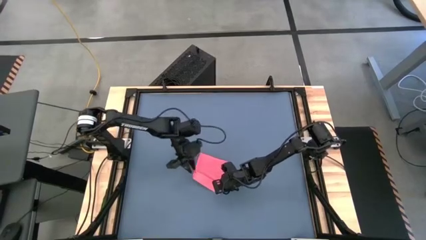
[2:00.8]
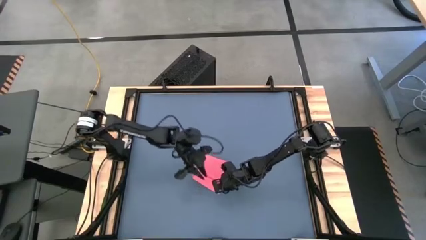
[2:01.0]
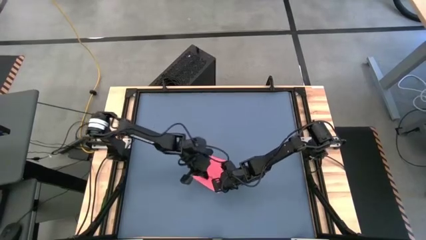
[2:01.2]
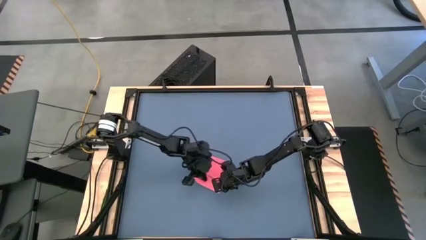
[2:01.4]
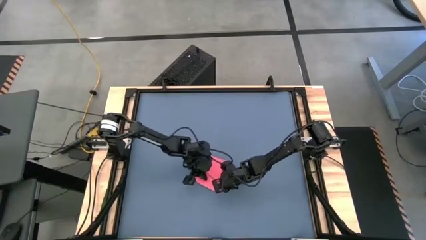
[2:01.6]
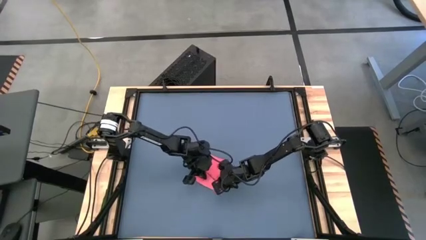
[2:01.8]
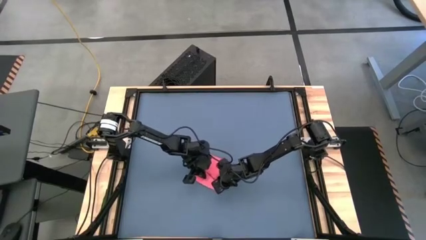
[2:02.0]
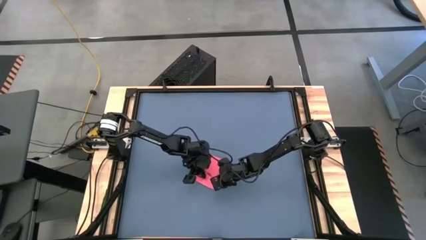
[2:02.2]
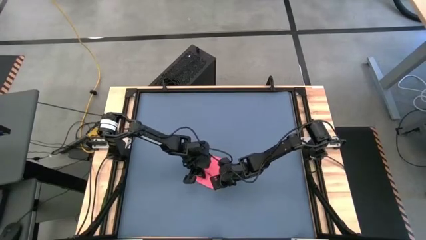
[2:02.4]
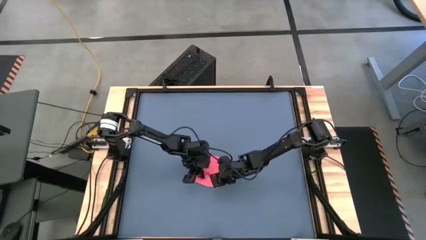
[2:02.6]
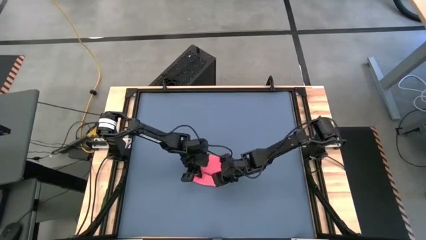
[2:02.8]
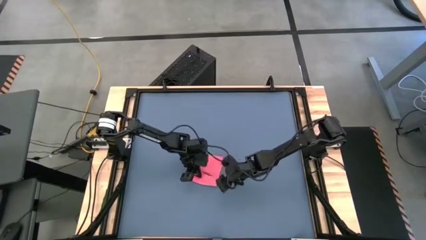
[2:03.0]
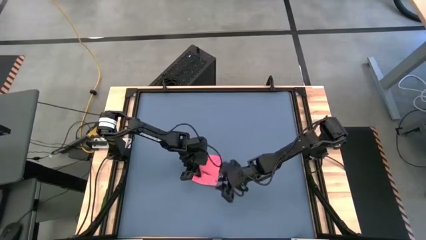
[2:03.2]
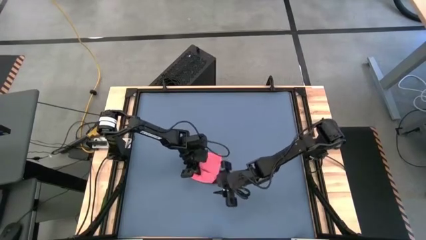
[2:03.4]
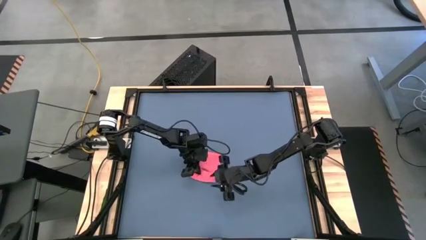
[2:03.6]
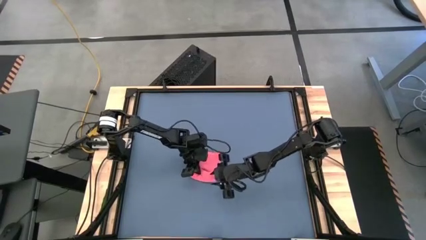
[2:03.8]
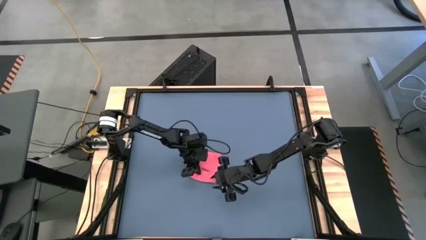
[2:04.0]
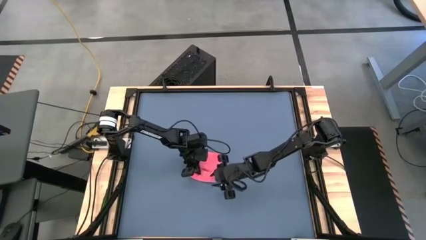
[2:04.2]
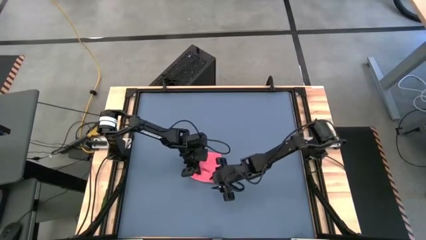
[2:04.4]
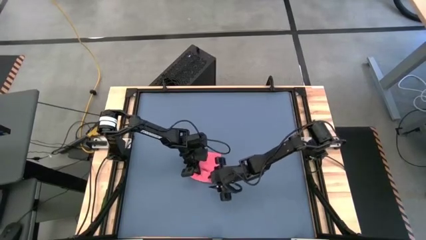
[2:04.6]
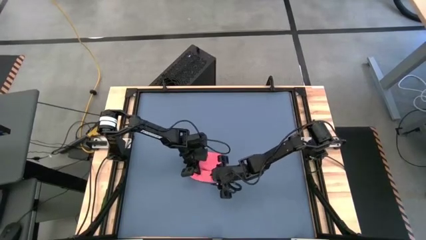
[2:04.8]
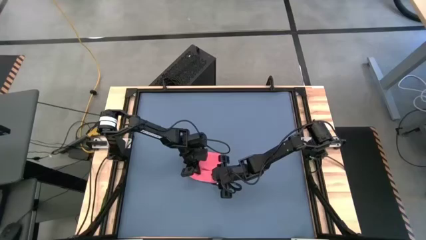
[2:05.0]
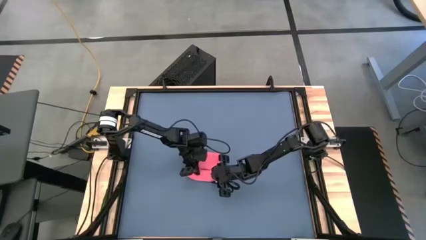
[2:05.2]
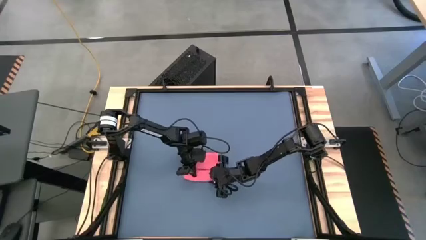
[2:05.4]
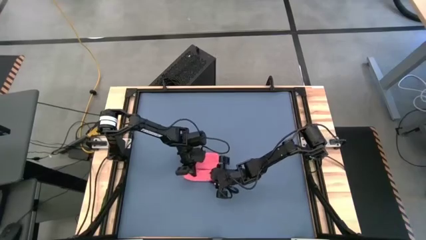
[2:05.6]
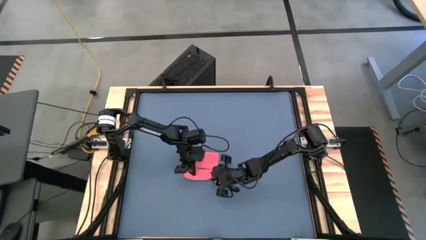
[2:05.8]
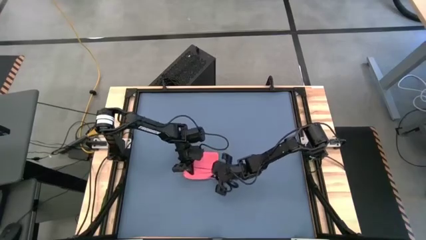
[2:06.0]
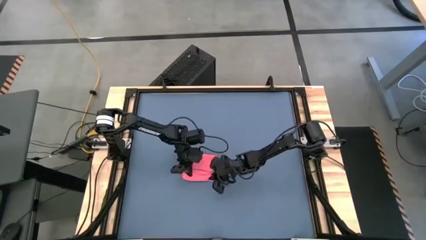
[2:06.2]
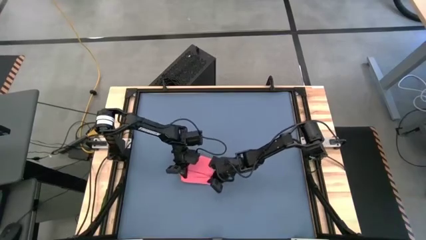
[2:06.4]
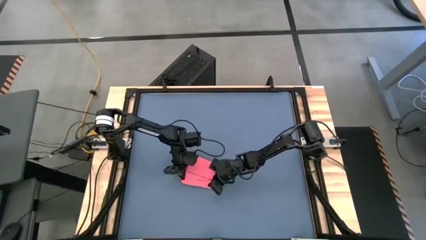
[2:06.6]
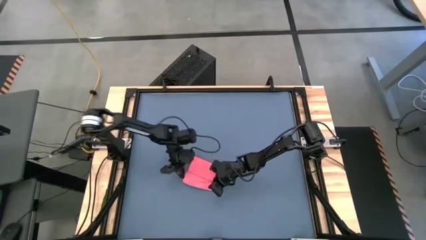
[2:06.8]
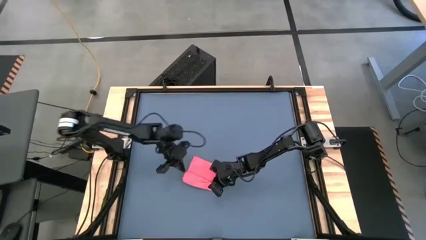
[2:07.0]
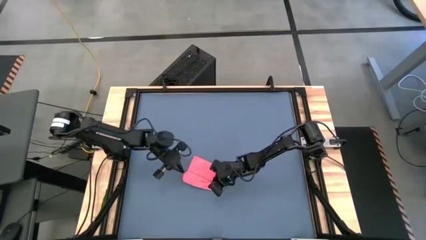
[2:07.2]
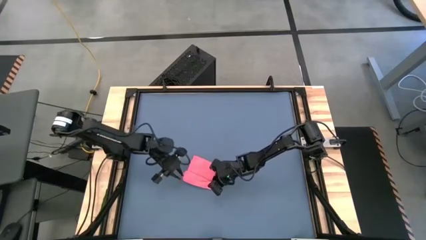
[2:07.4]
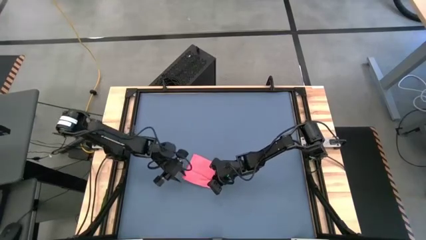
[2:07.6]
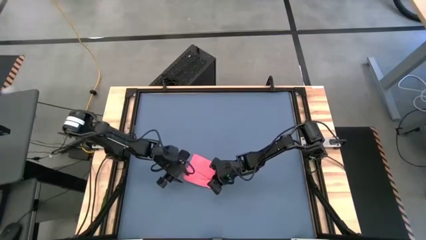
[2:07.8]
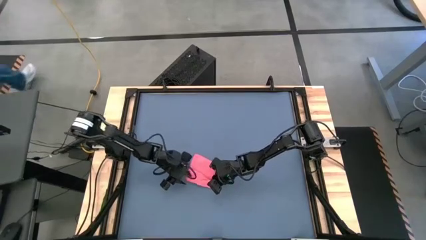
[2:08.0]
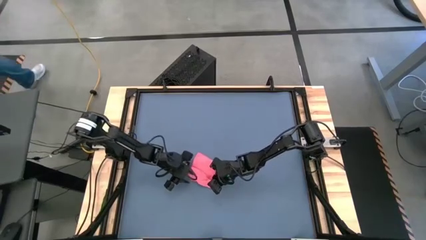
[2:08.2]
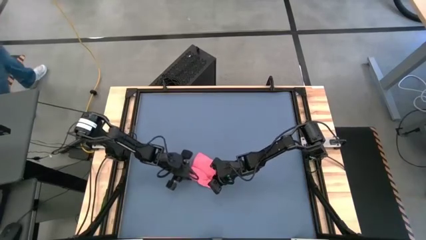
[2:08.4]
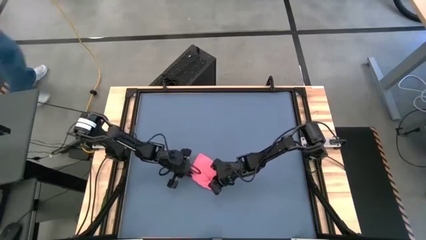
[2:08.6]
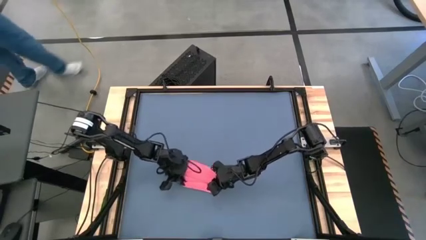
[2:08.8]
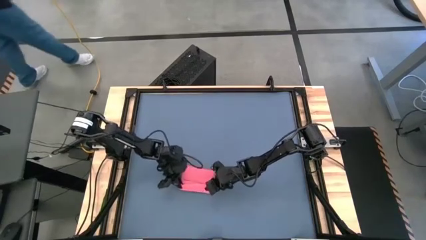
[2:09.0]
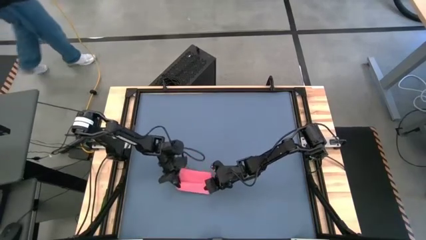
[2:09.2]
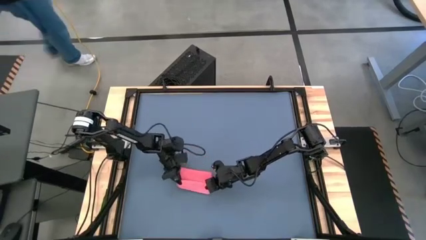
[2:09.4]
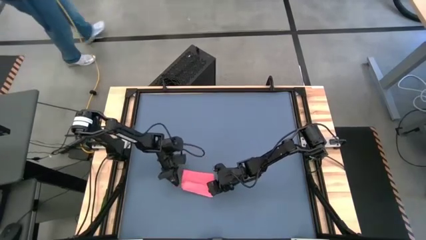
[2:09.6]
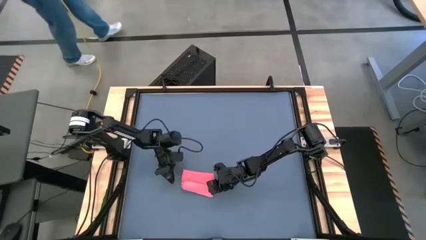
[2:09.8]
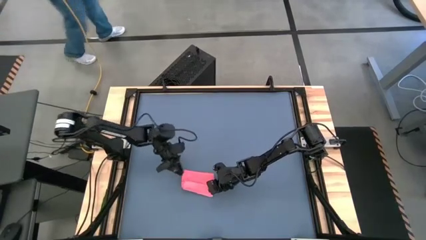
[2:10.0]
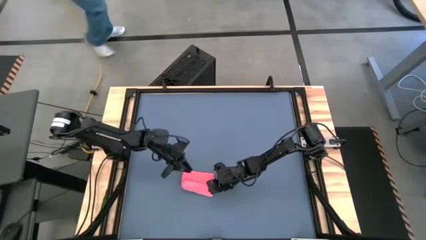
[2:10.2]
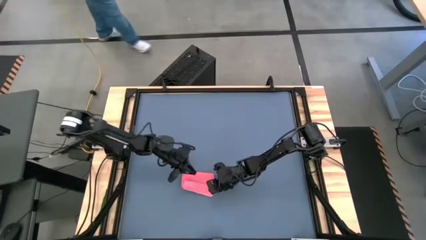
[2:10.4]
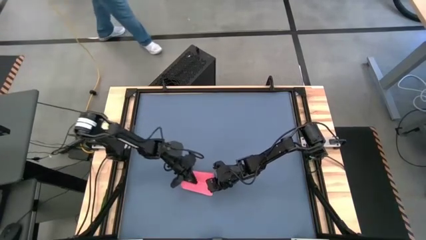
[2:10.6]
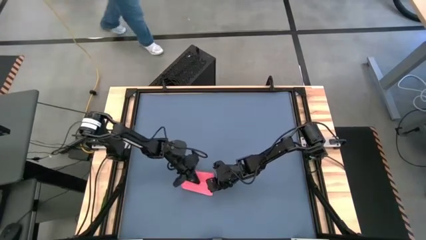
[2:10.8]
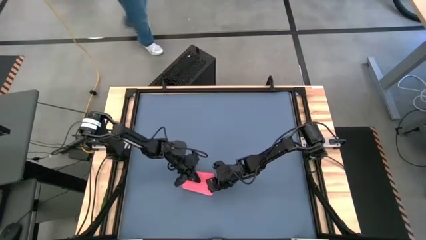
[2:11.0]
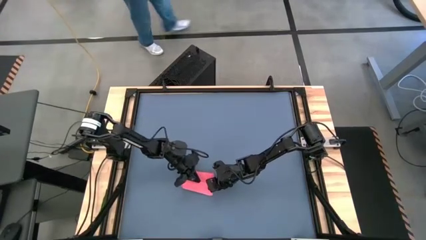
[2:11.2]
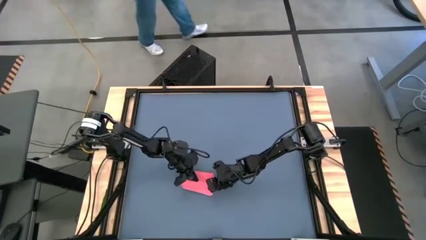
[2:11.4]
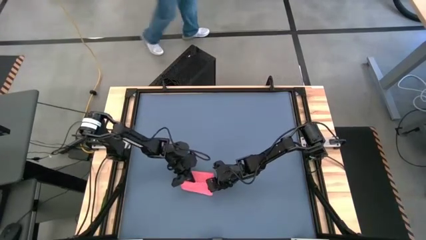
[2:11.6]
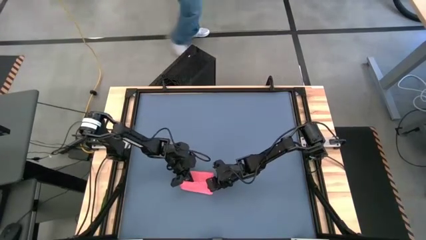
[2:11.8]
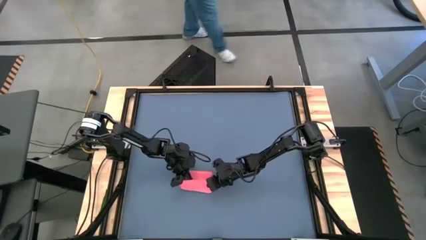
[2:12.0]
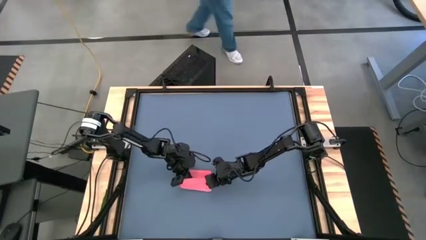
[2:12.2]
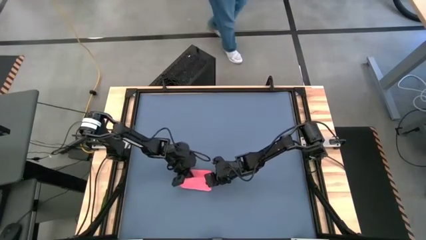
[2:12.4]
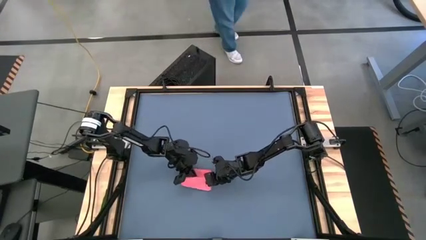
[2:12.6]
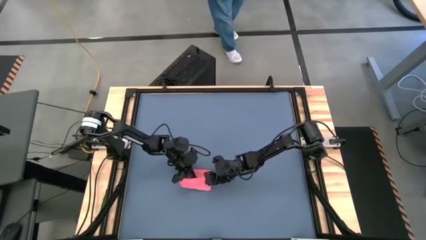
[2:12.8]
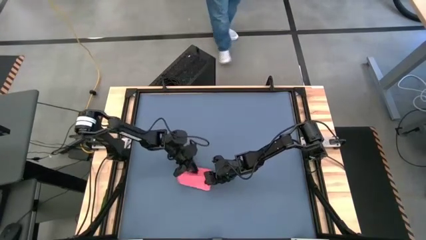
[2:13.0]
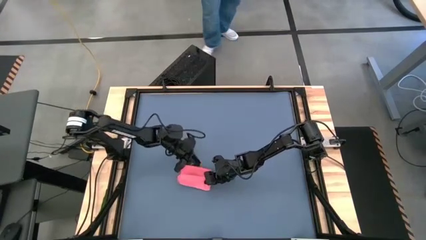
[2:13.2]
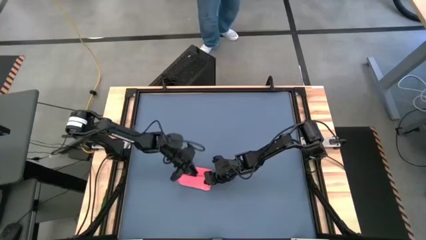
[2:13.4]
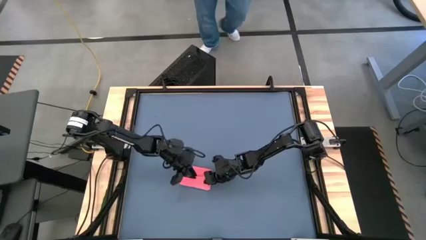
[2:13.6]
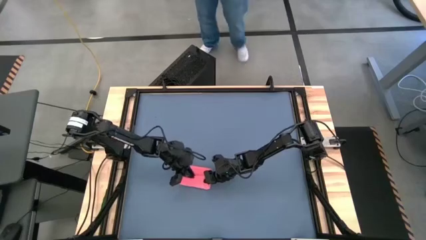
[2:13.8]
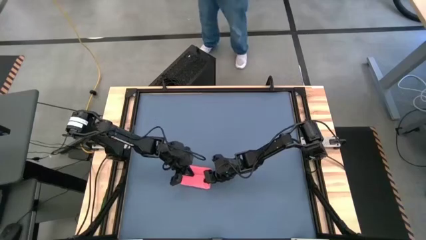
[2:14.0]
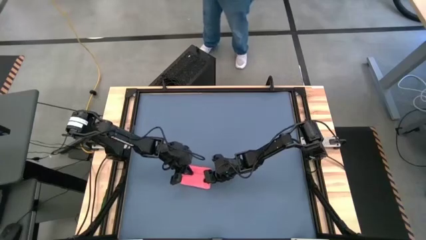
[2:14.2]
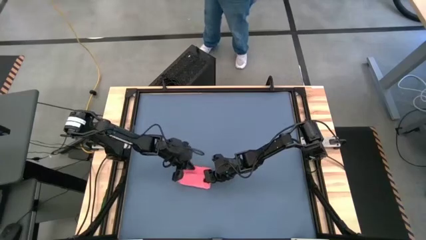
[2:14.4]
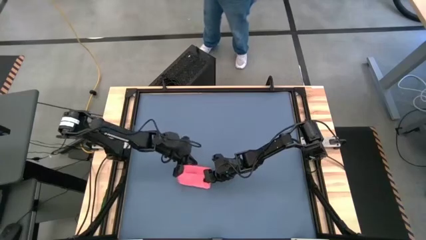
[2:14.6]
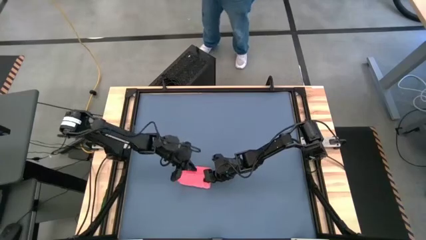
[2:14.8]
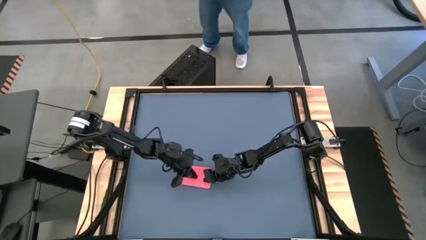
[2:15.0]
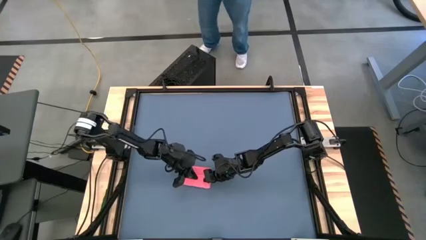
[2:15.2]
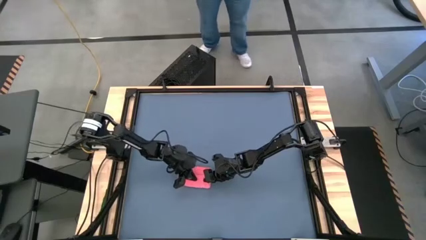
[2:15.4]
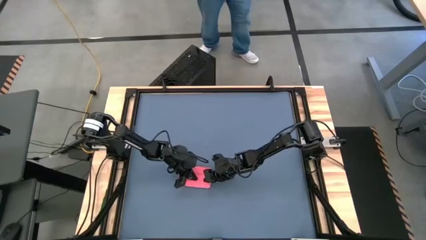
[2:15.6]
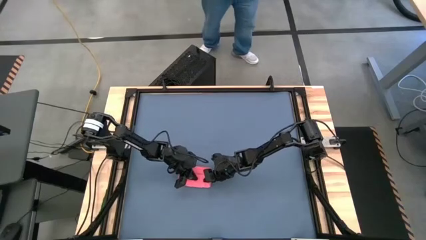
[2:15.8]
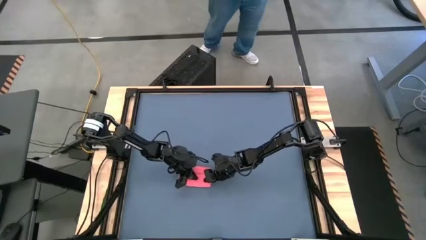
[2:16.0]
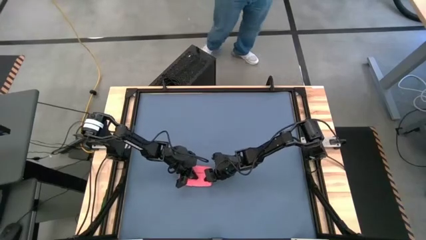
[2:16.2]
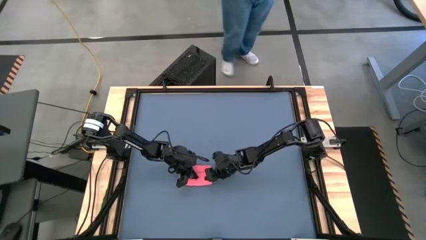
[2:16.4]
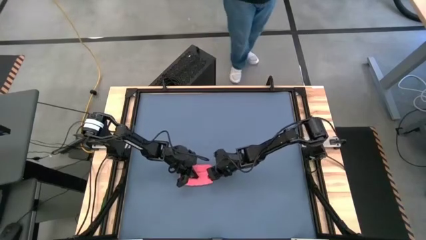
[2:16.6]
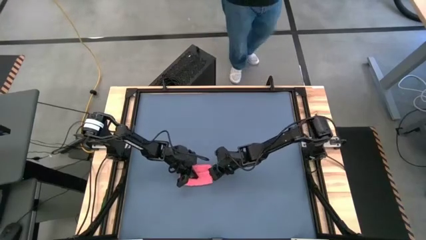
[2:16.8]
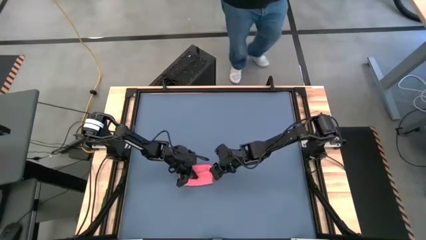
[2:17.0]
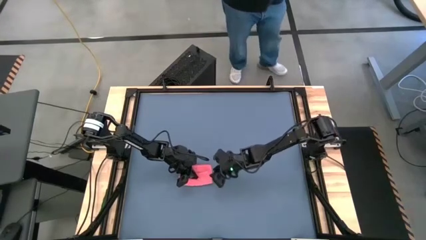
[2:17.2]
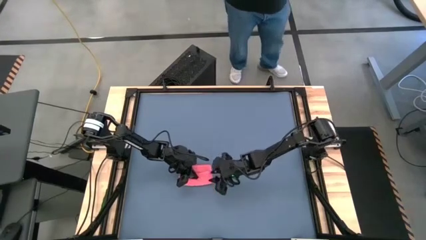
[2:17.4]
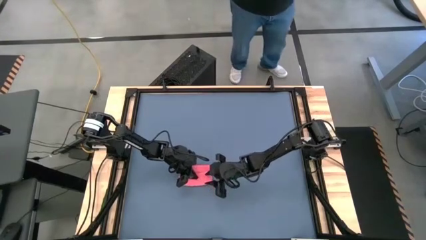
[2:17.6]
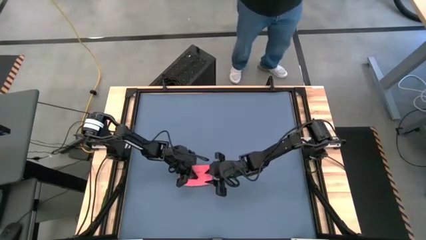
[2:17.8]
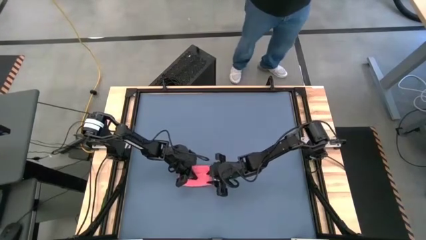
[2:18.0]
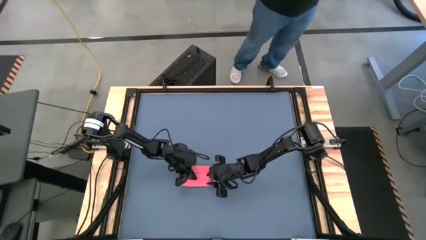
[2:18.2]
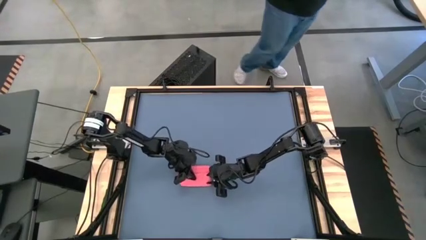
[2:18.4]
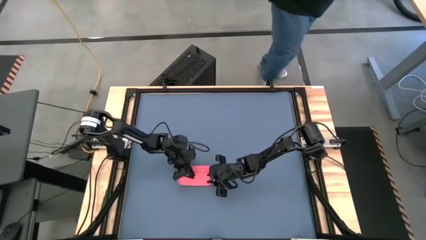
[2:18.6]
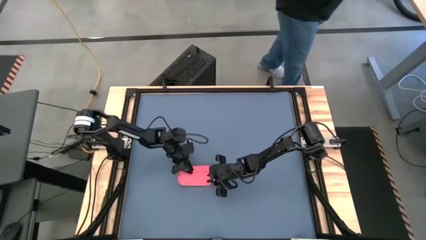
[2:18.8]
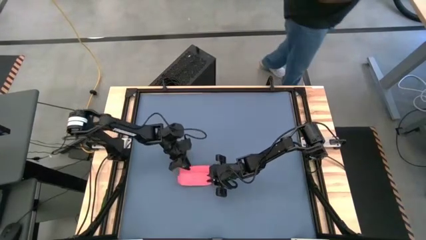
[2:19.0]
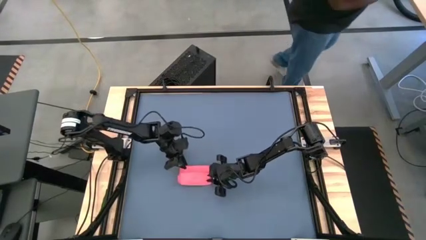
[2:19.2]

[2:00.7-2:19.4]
Task: Roll towel
Roll the pink towel
